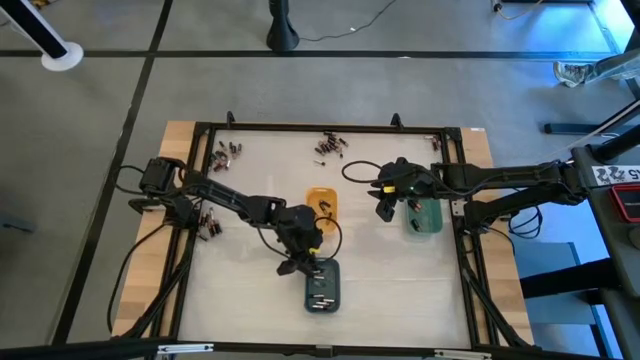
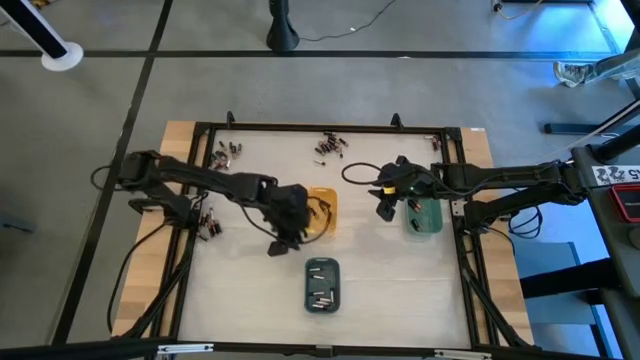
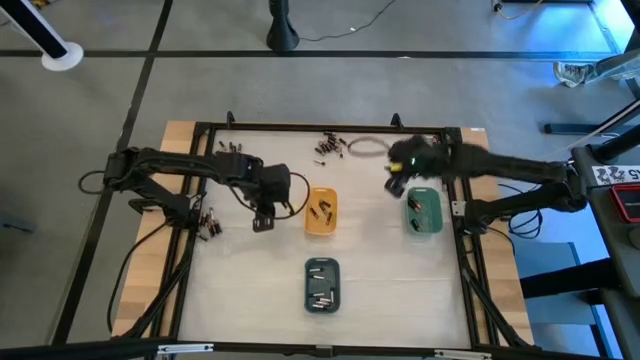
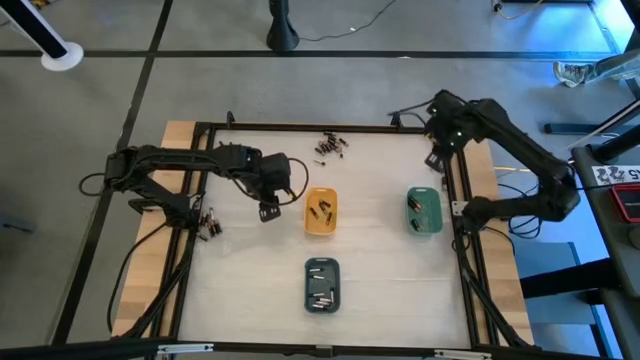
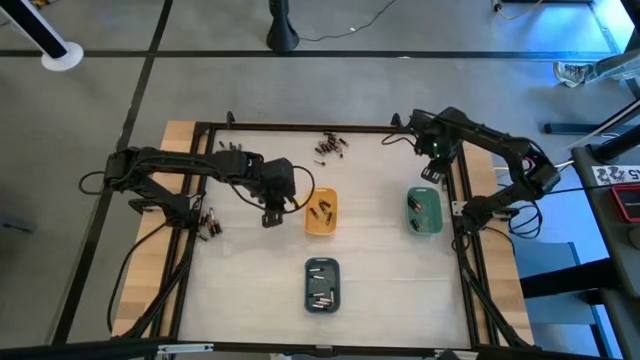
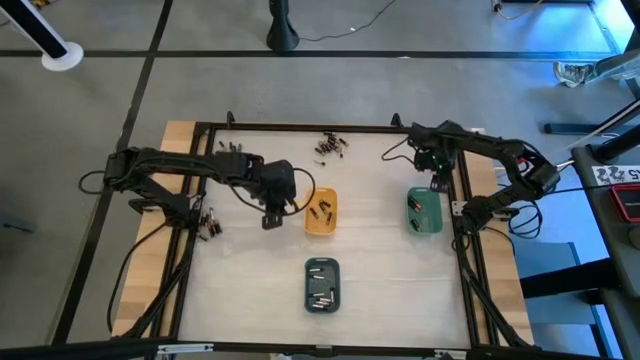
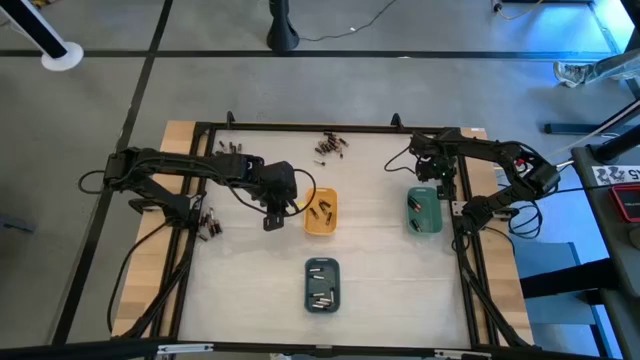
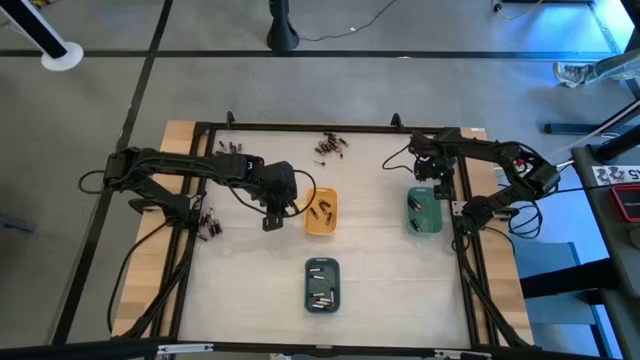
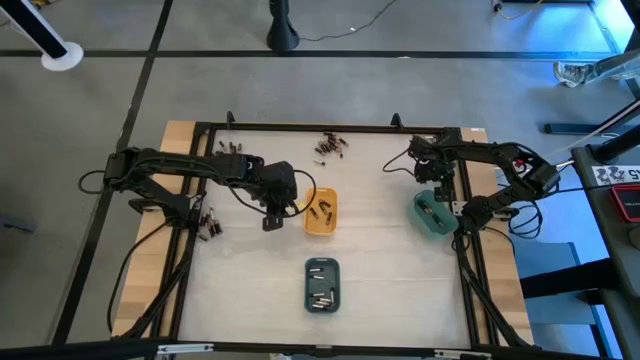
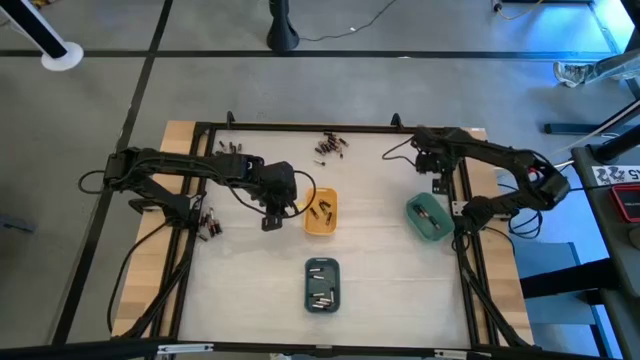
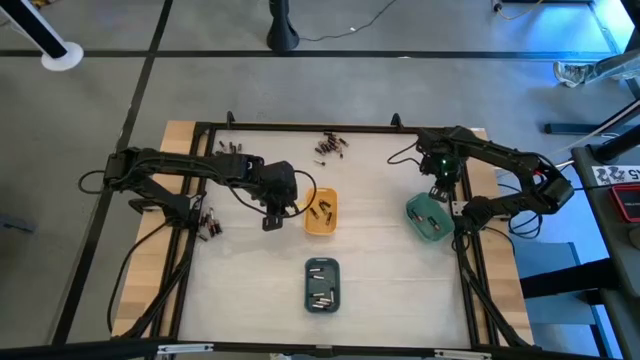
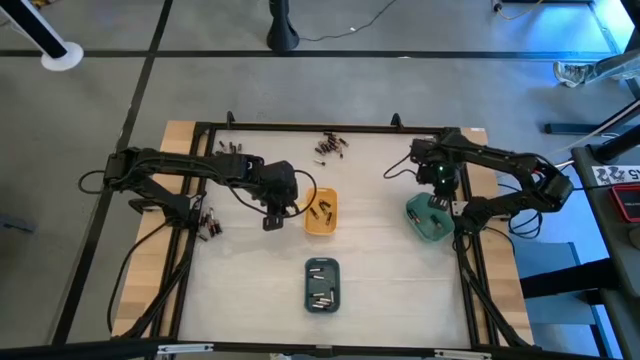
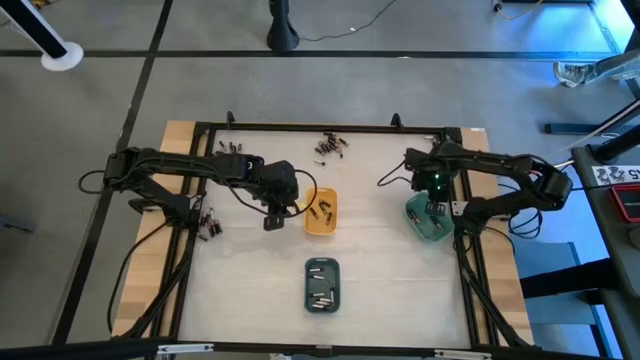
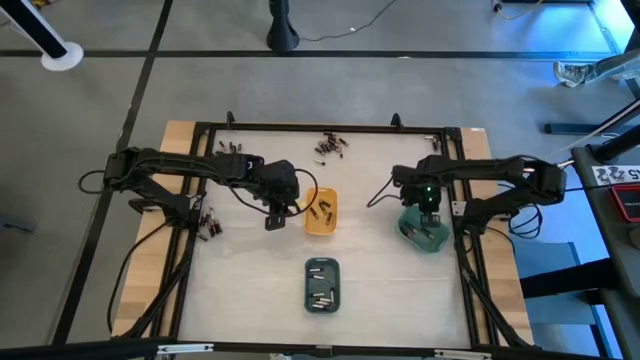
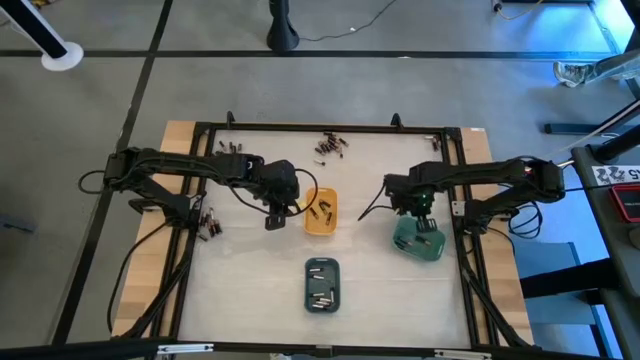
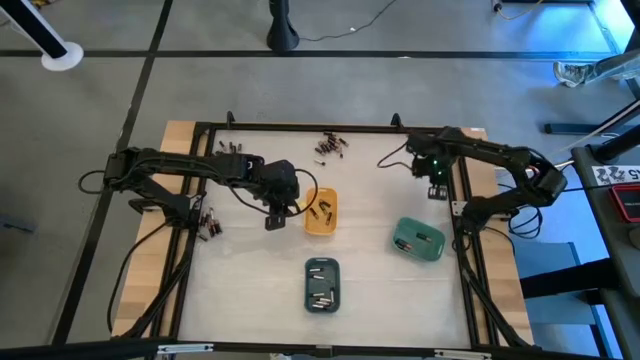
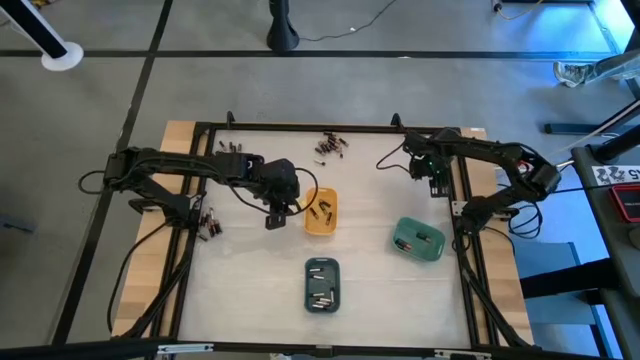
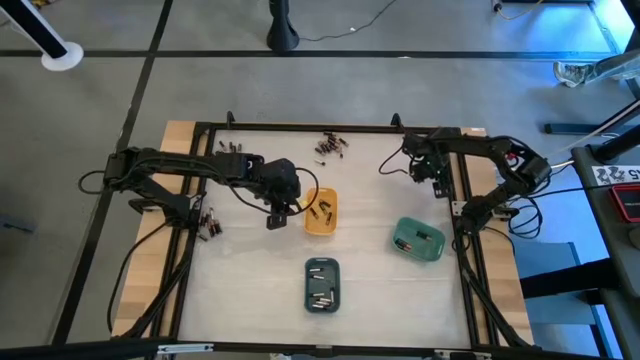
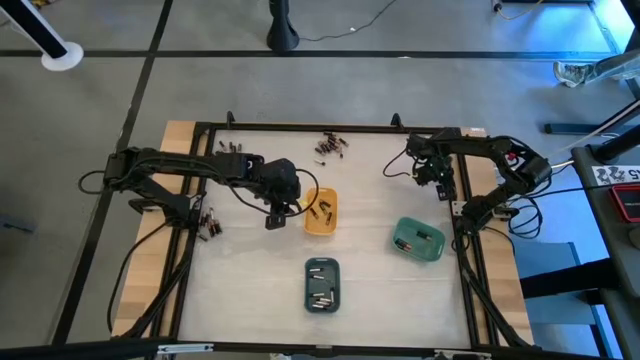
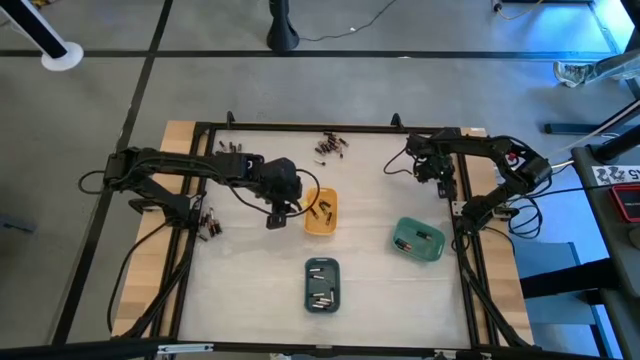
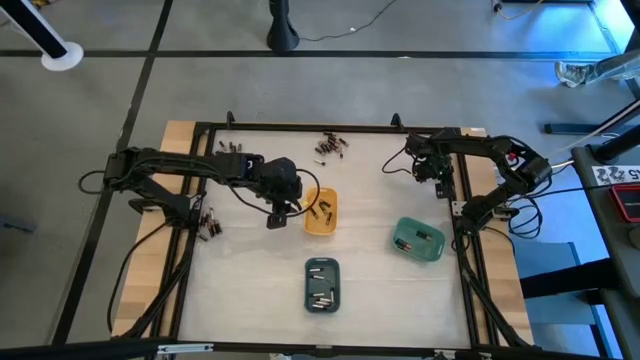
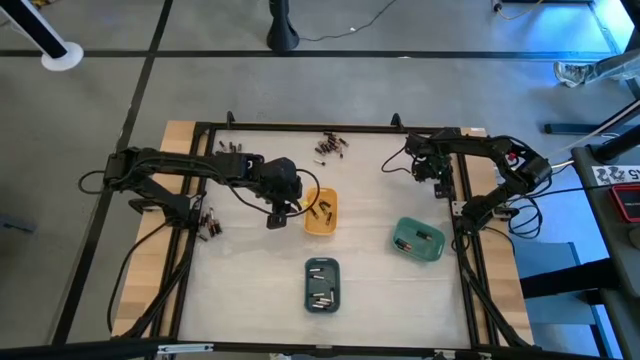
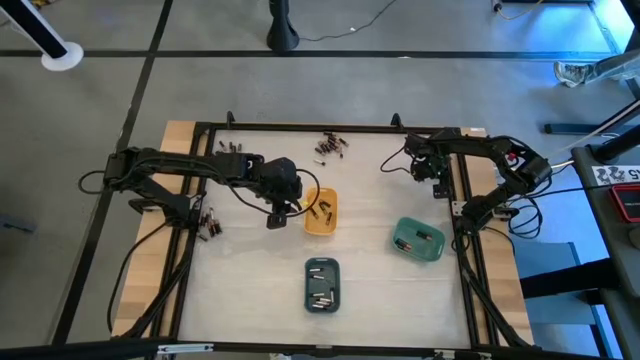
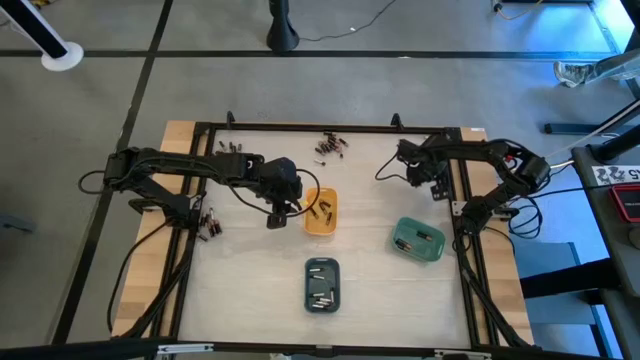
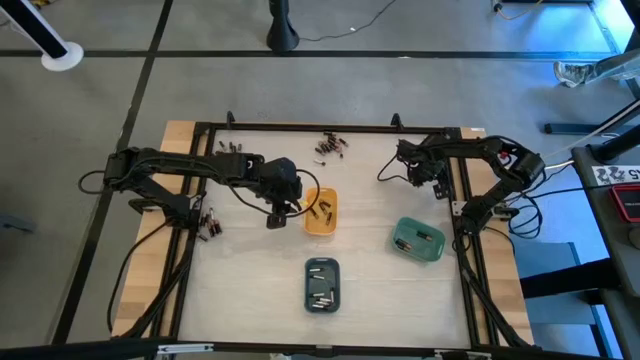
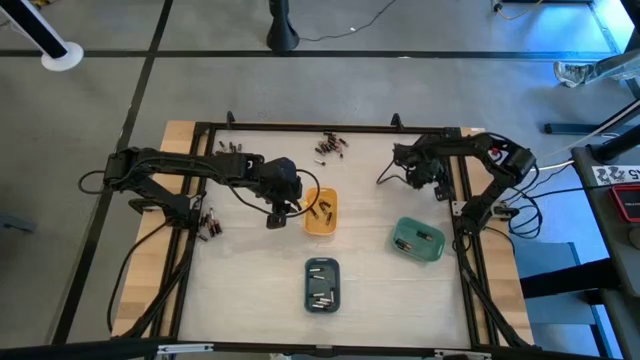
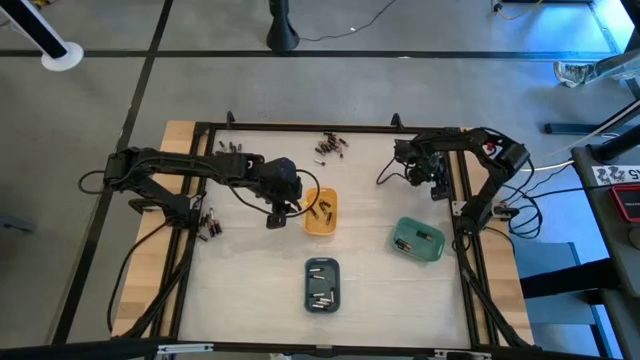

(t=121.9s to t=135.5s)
Task: Sort batteries
Put the black battery into the green bin

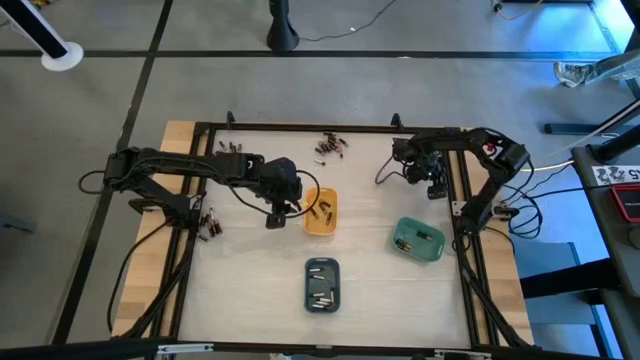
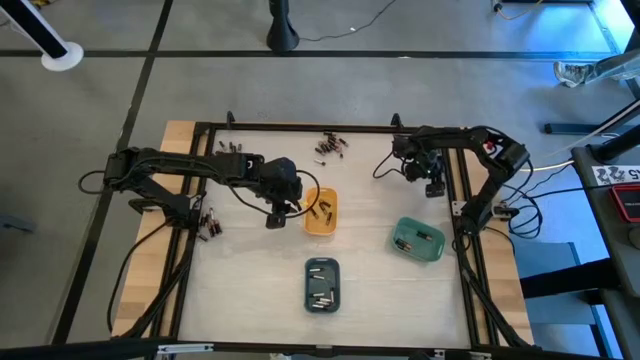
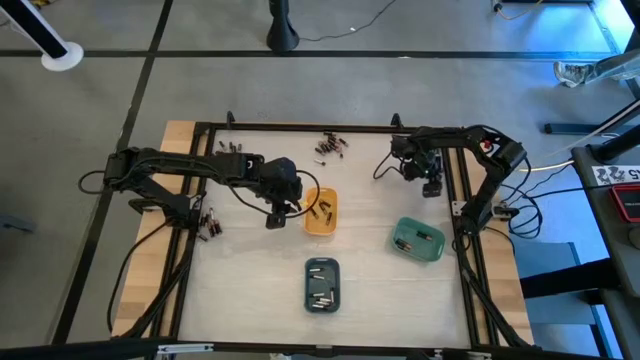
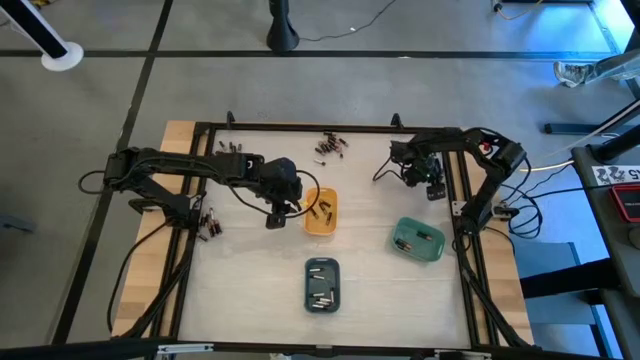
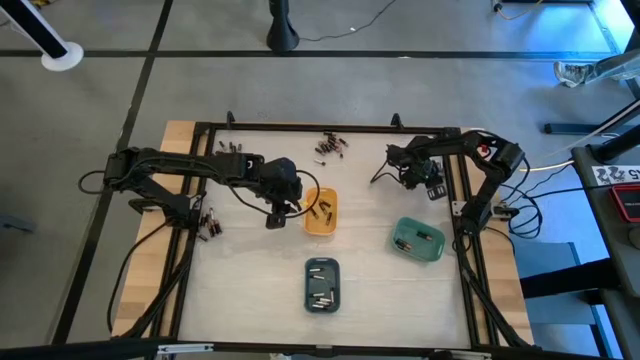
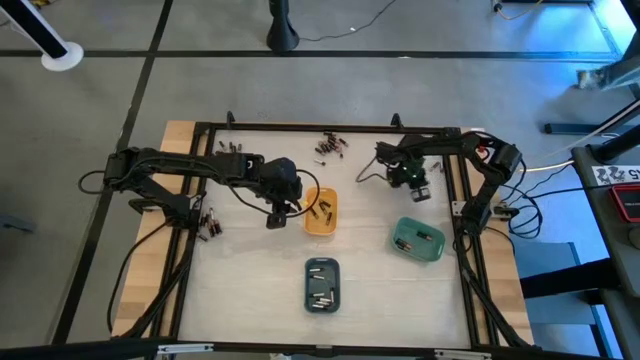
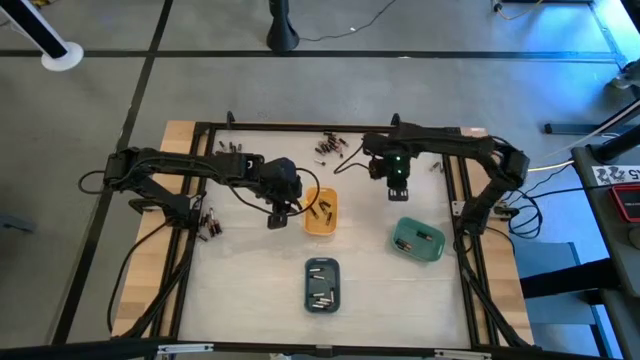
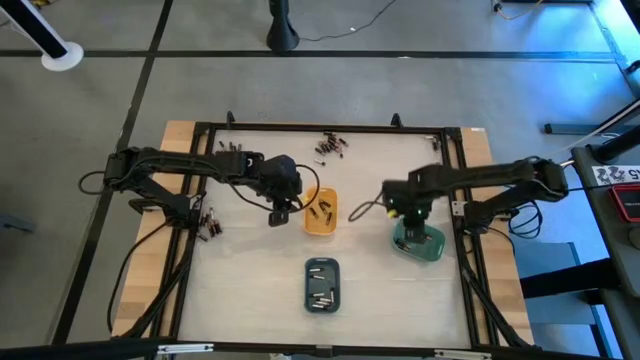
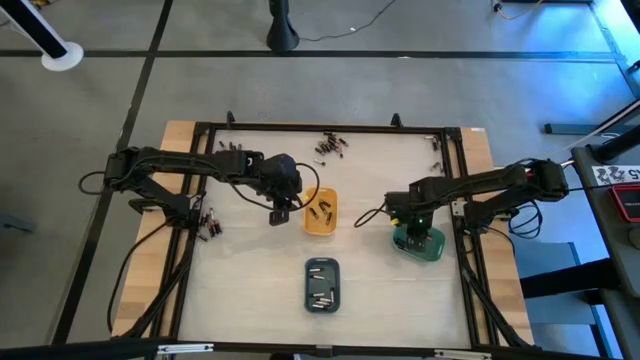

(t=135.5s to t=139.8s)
Put the black battery into the green bin

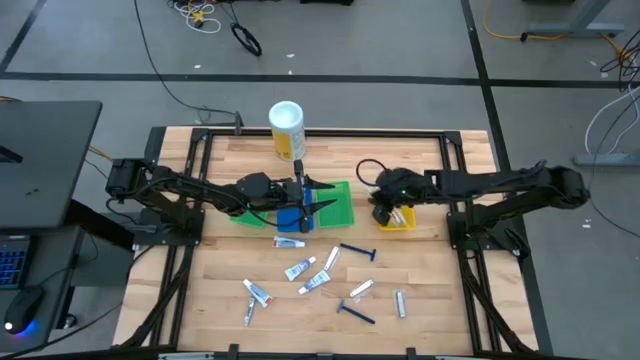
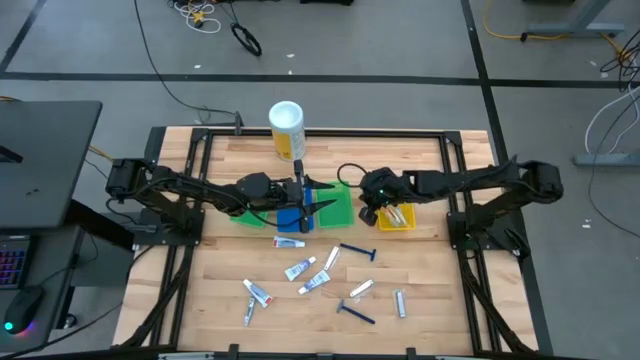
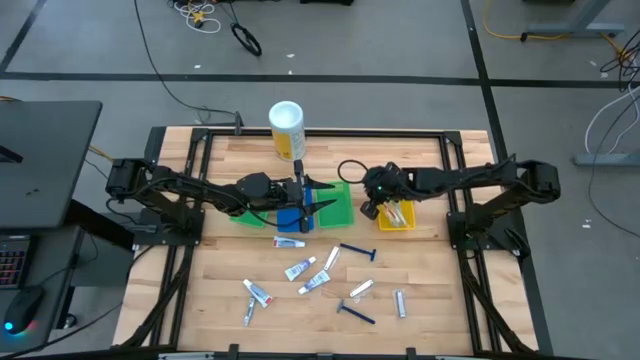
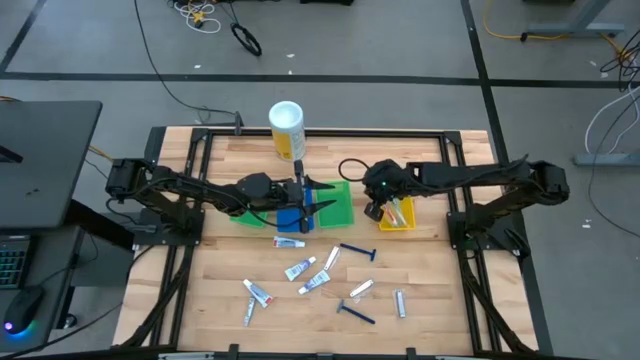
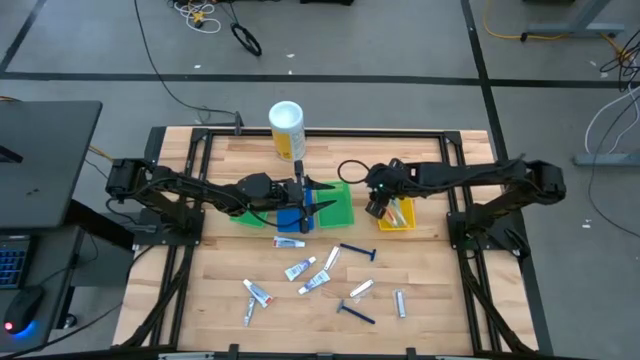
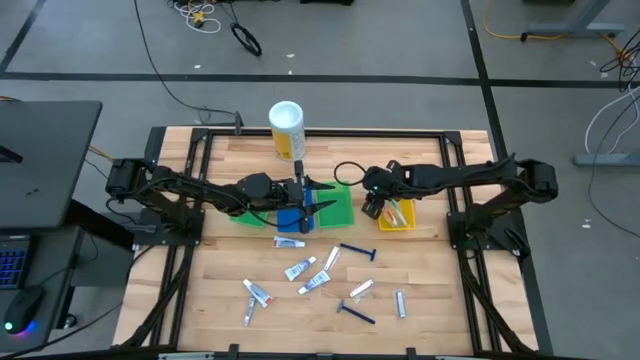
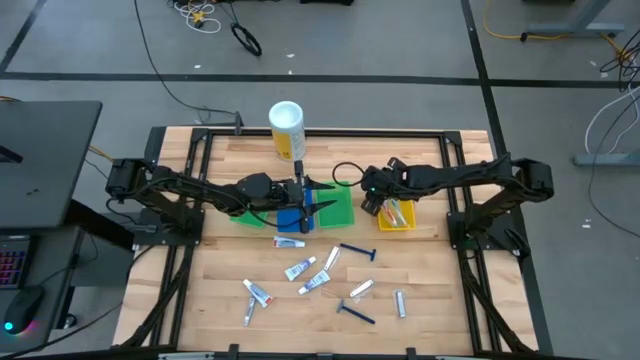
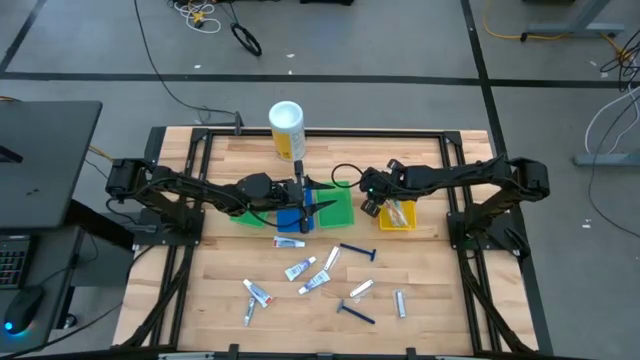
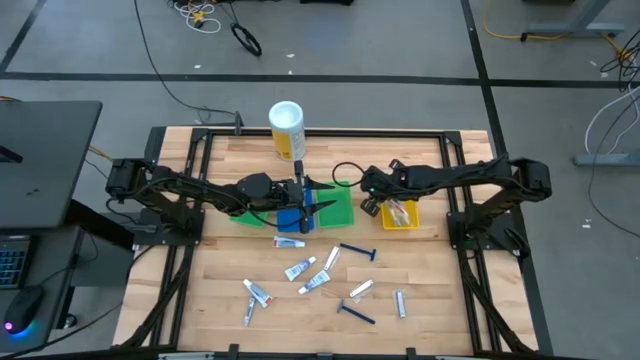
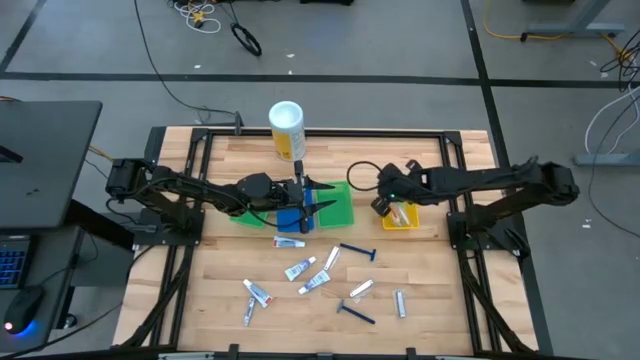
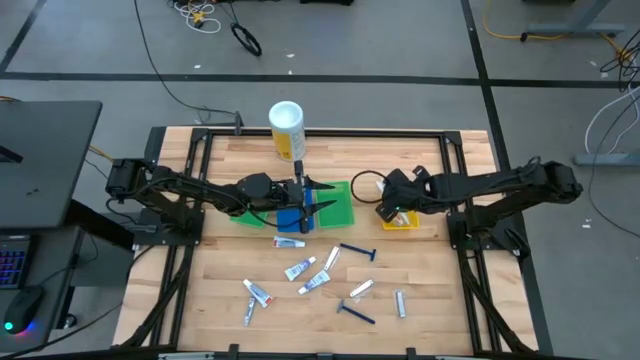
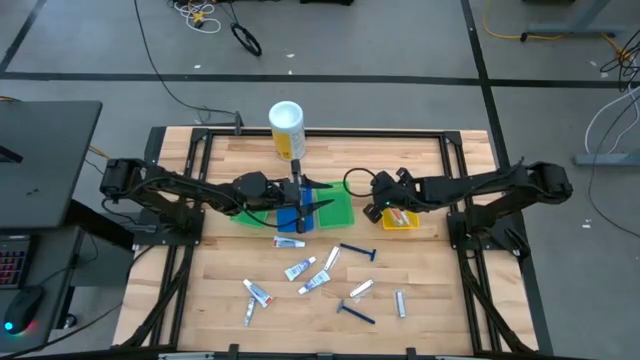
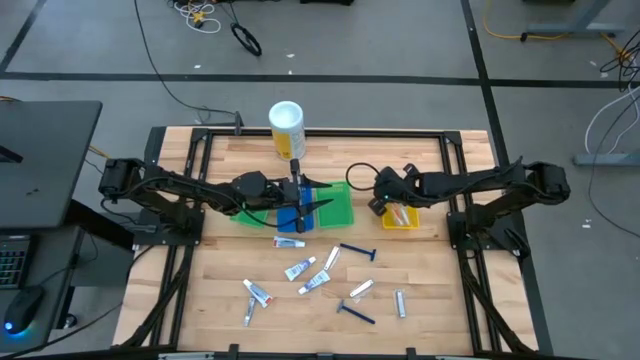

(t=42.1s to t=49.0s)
Task: Pick & Place Travel size toiletries
Adjust the red and white toothbrush in the yellow bin
